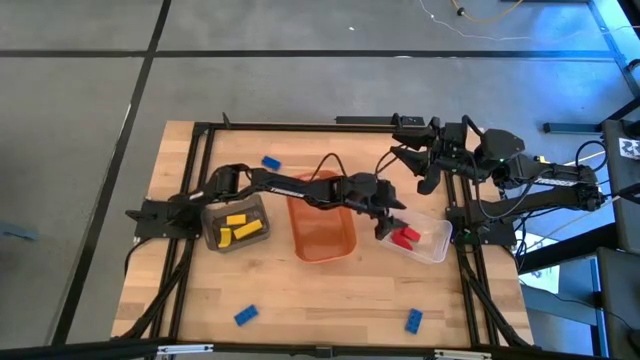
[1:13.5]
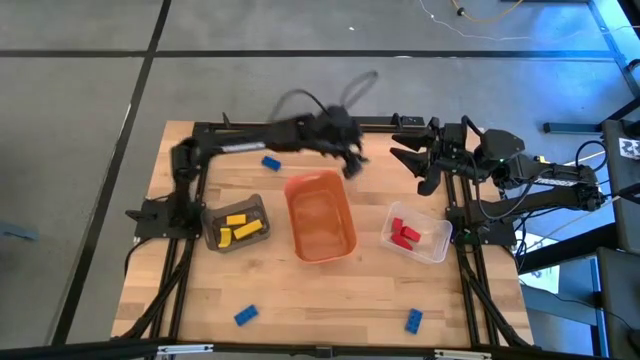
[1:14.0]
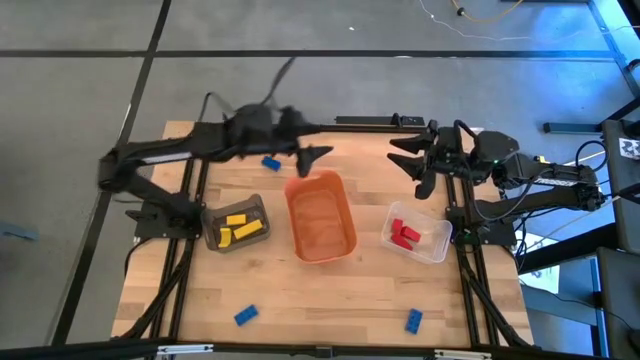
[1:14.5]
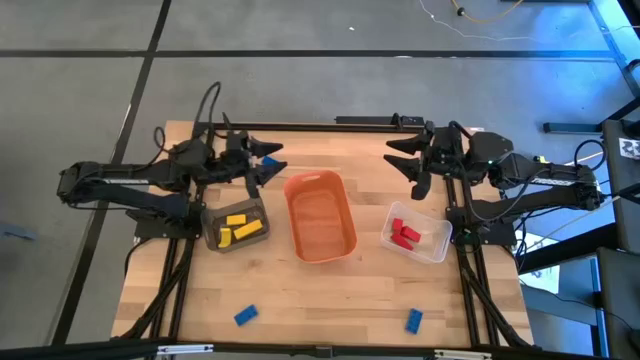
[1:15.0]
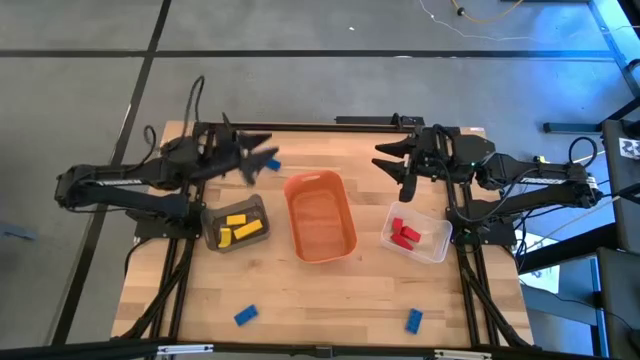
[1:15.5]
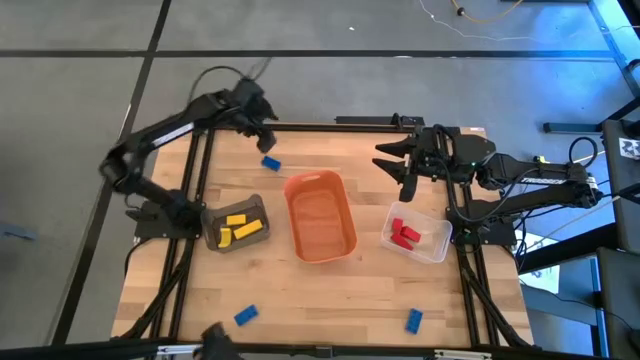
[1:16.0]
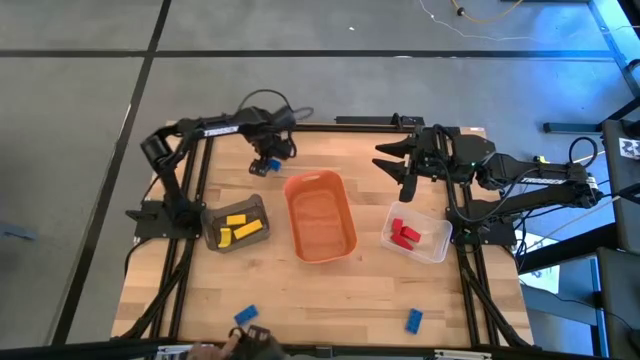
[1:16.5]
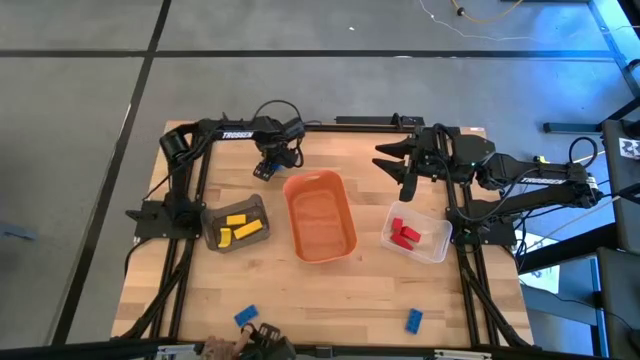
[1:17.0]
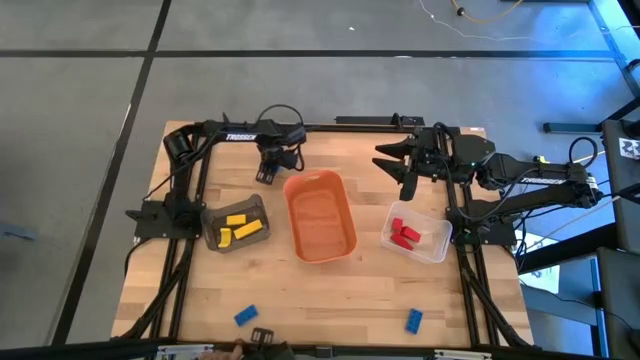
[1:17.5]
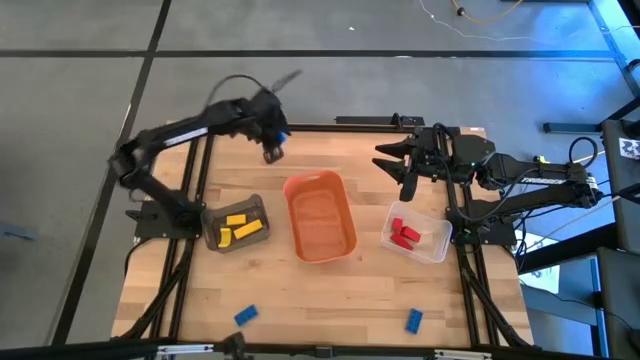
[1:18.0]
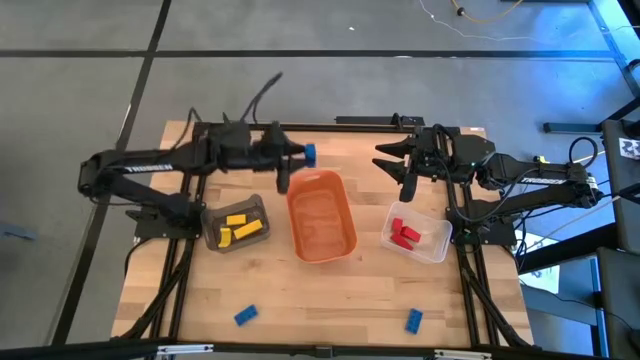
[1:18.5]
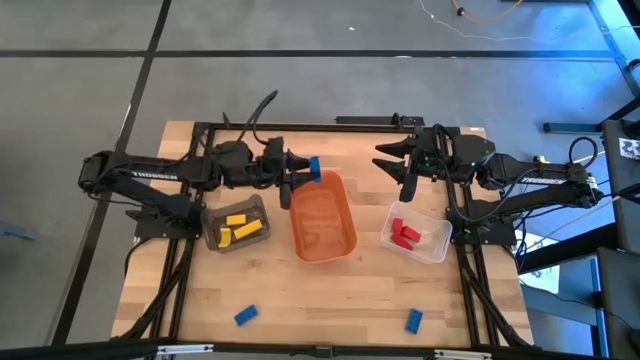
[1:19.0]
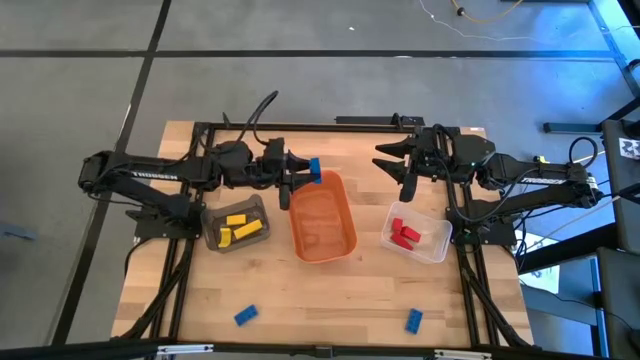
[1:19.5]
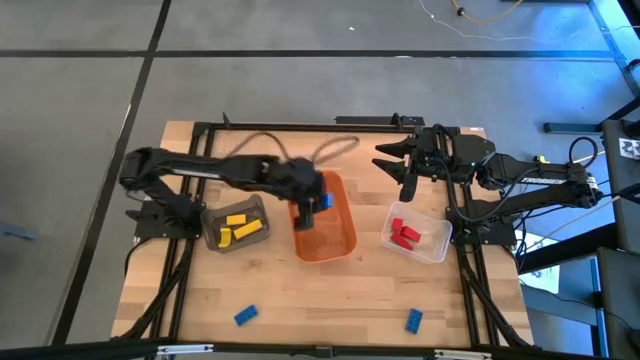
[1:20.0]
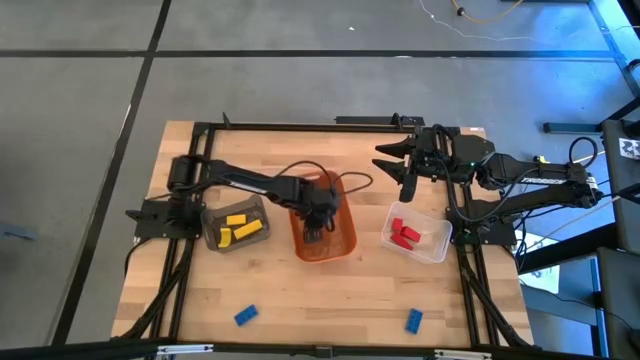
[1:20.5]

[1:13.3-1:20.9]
Task: Sort & place blocks by color
Put the top blue game piece into the orange bin

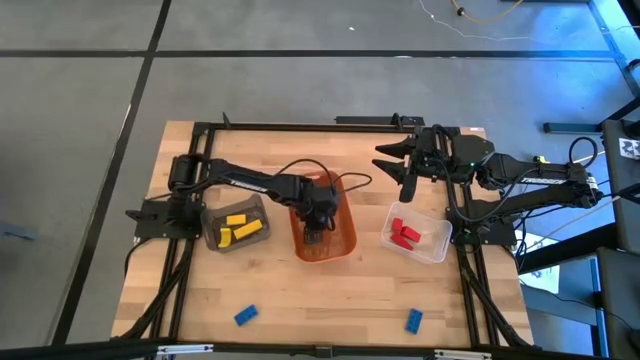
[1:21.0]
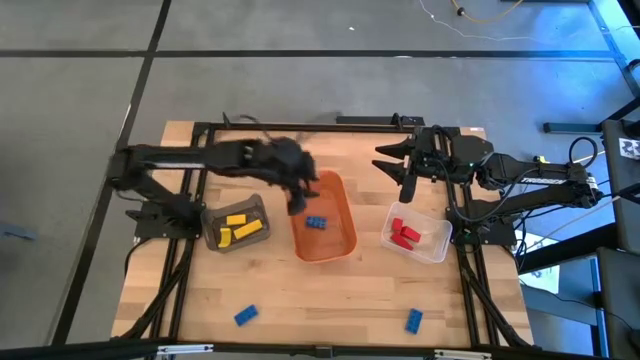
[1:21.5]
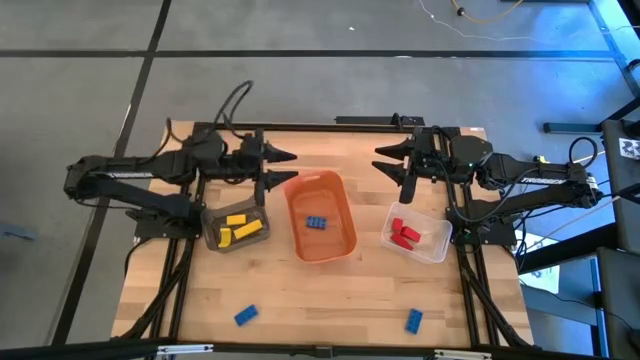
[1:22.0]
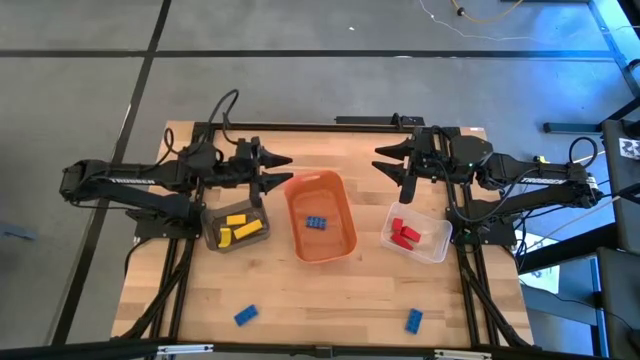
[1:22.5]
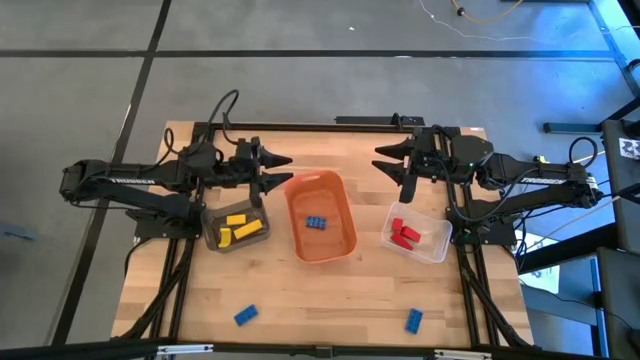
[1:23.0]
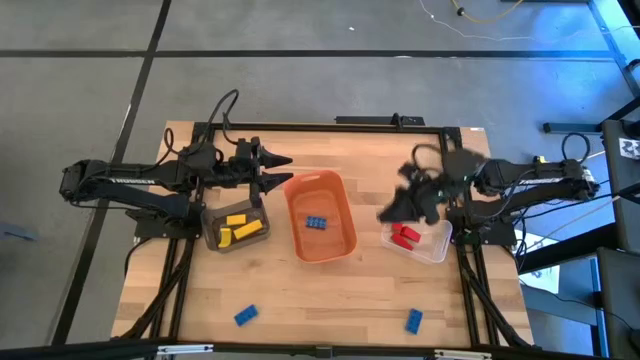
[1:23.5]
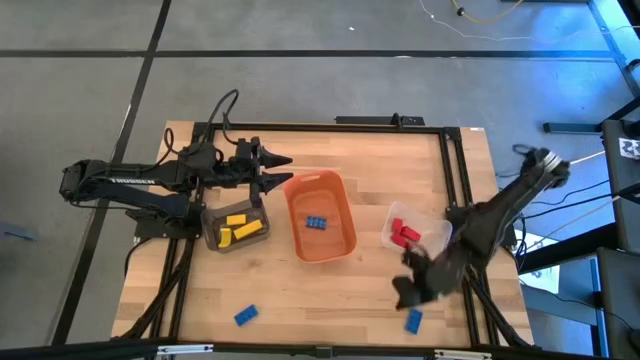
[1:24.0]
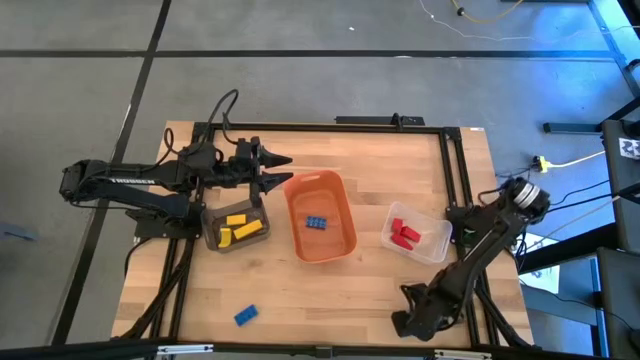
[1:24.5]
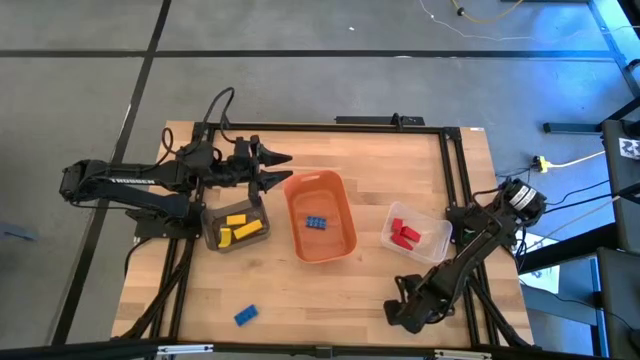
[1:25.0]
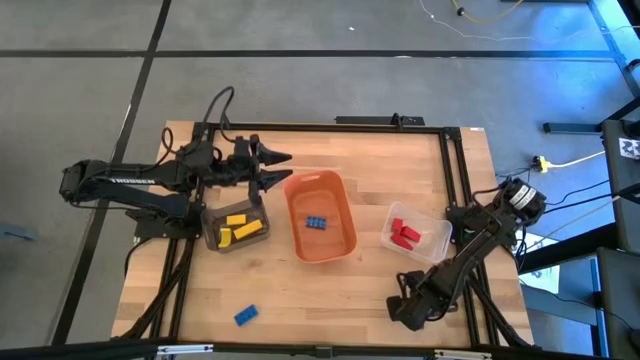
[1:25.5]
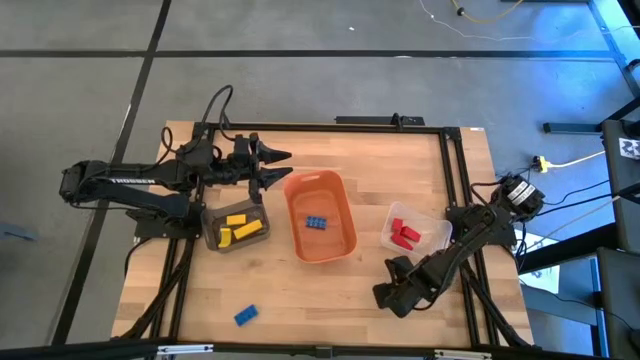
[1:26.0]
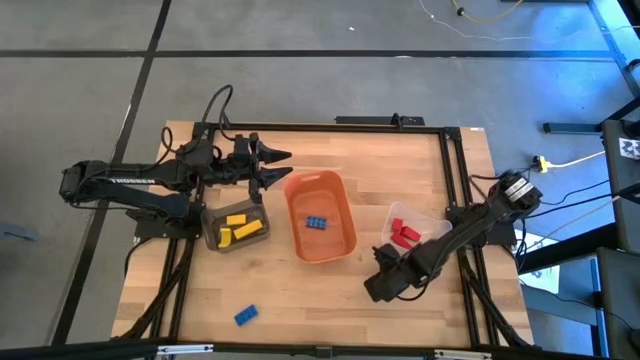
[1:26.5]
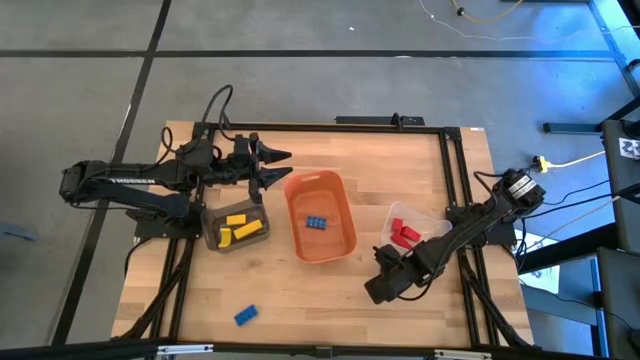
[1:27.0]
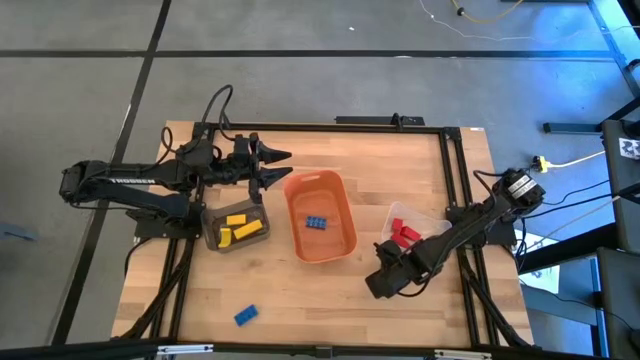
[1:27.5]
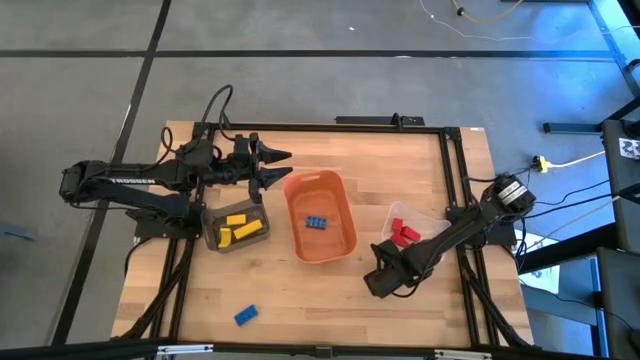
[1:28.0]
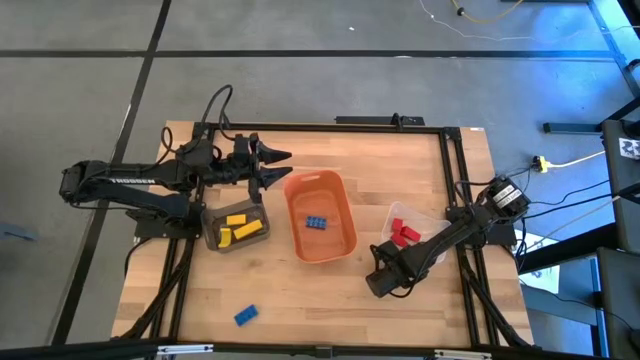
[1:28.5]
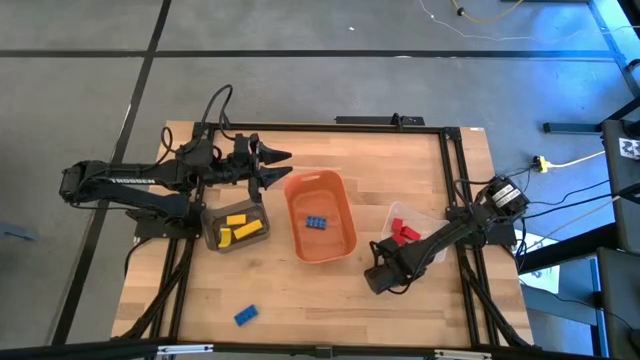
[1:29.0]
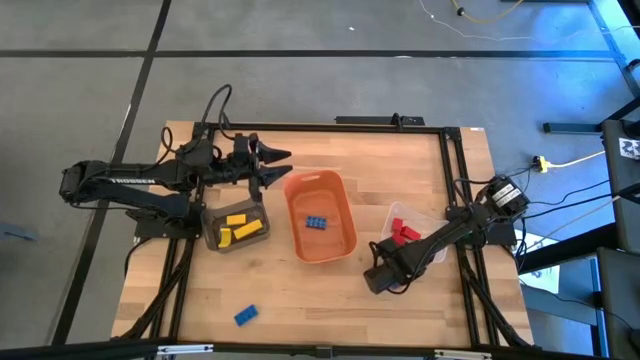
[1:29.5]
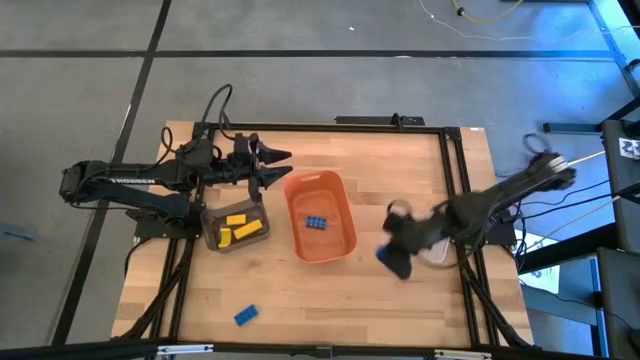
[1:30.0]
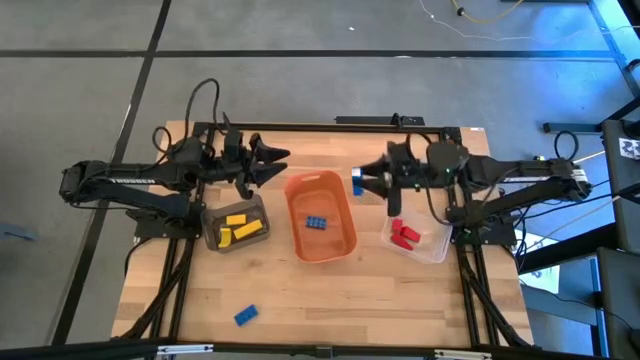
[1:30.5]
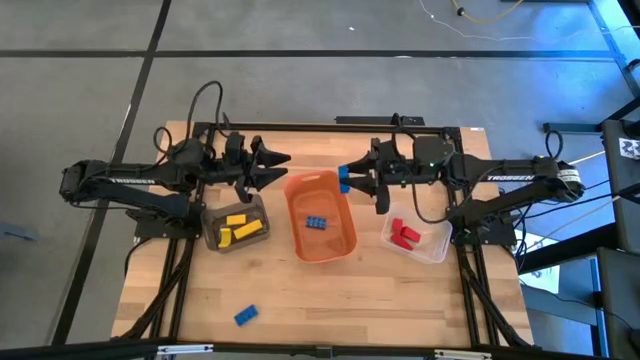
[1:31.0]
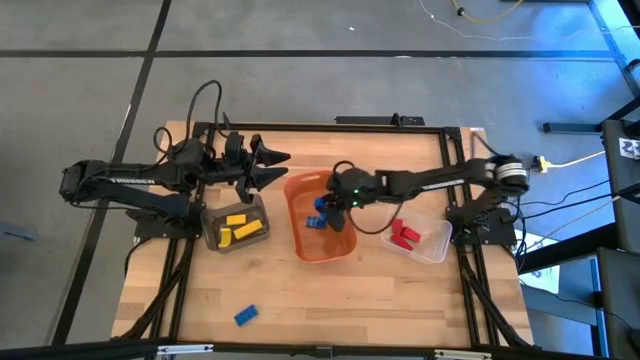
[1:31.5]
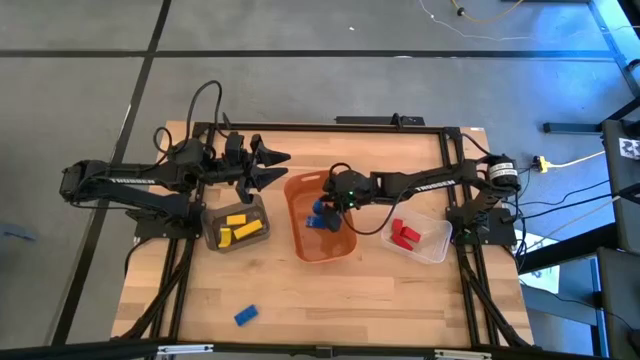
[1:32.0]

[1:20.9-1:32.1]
Put the right blue game piece into the orange bin

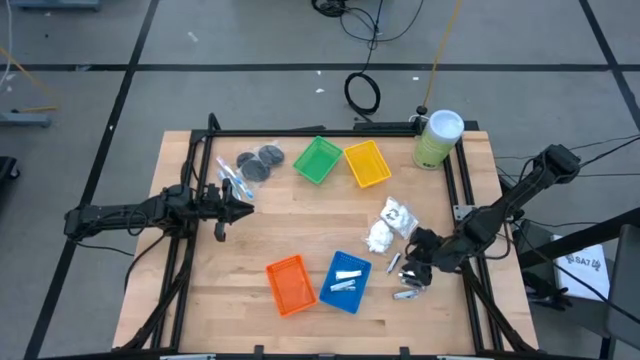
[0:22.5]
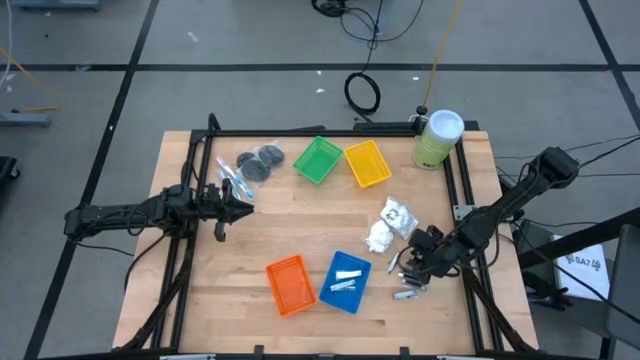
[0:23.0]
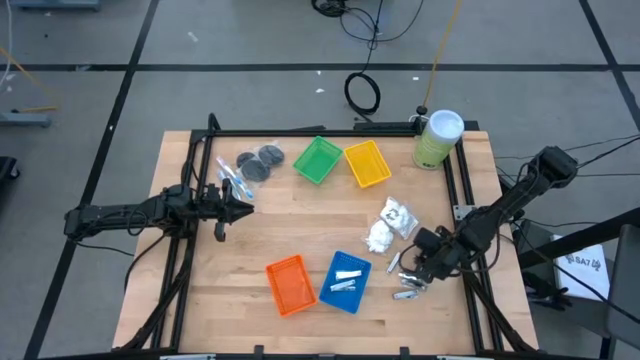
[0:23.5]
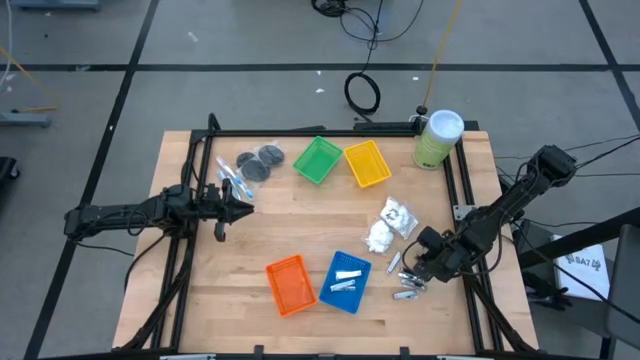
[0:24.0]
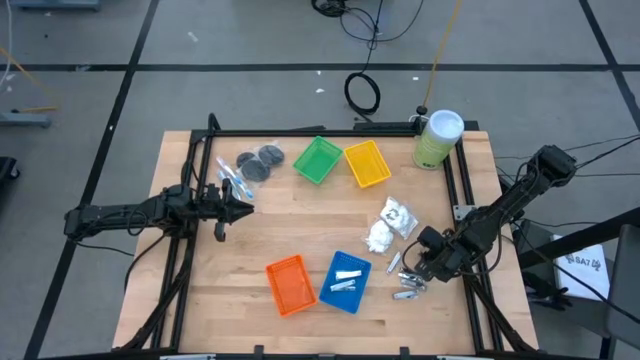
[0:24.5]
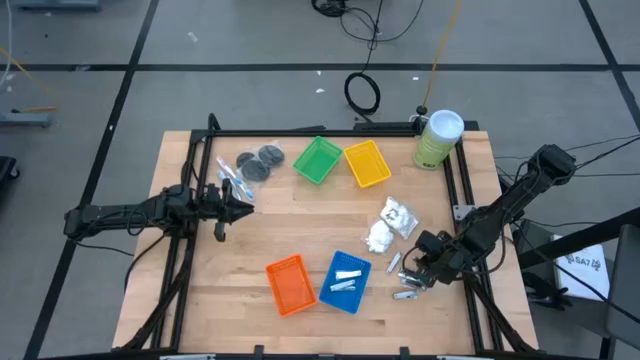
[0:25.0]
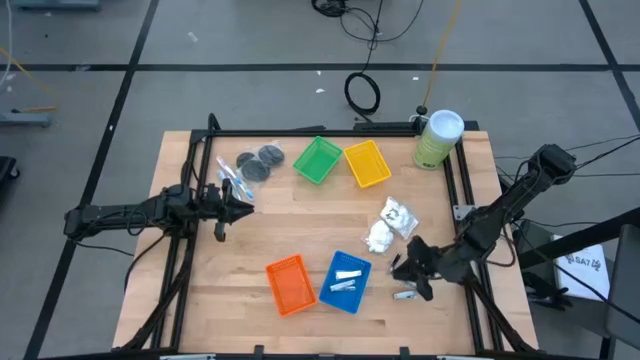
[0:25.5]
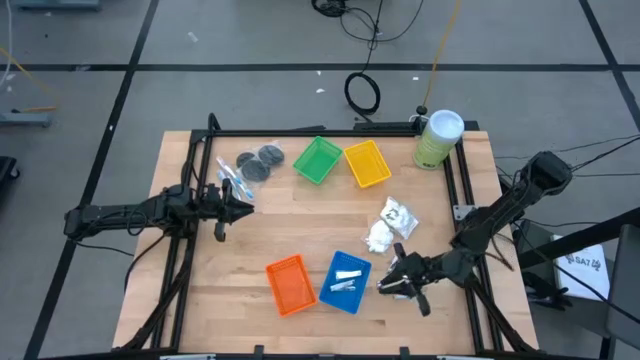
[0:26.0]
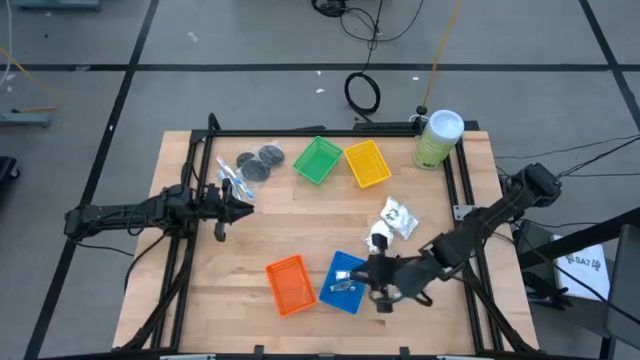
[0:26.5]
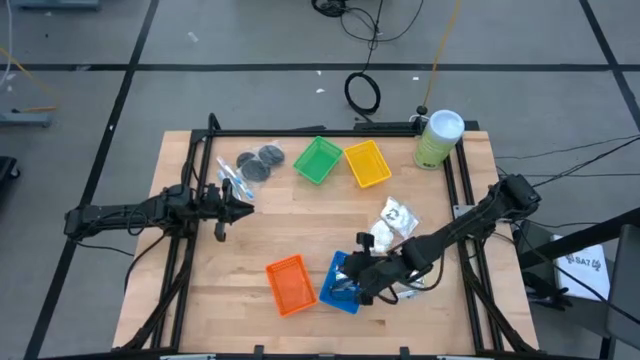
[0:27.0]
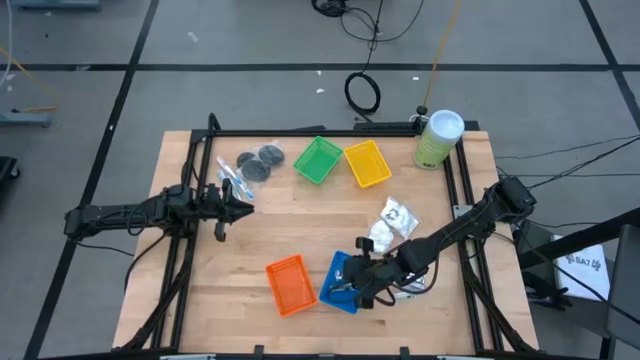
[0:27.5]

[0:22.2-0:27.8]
Task: Pick & Place Travel size toiletries
Put the silver nail cutter into the blue bin
